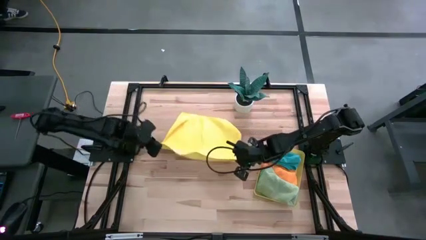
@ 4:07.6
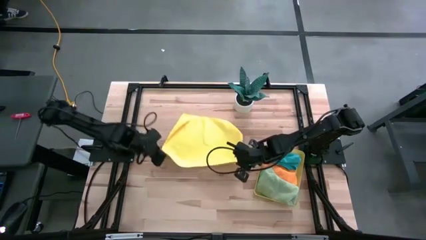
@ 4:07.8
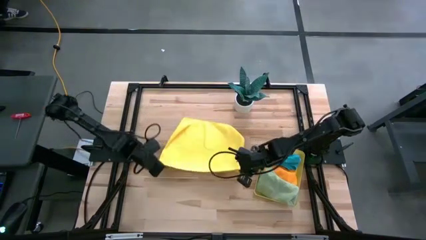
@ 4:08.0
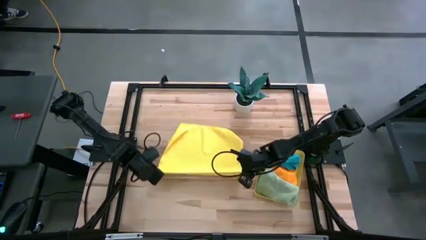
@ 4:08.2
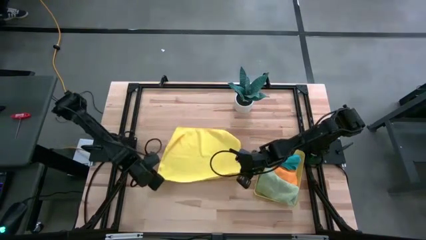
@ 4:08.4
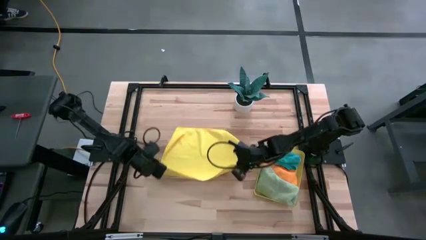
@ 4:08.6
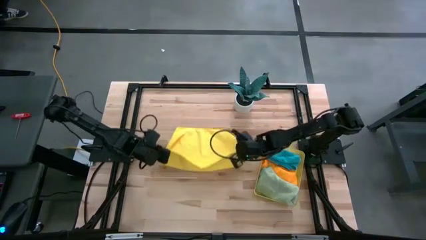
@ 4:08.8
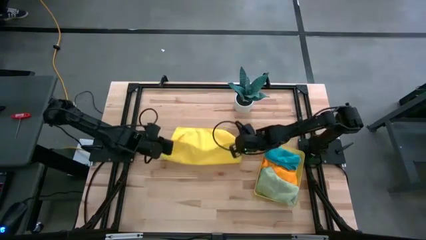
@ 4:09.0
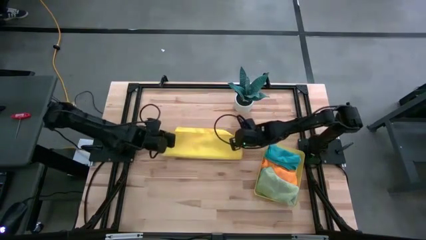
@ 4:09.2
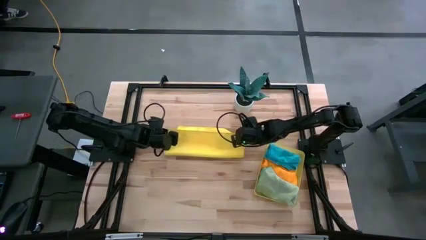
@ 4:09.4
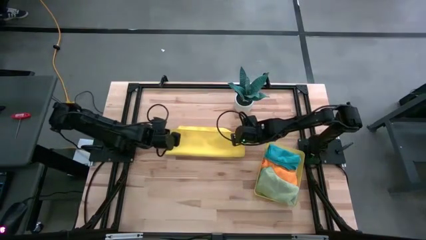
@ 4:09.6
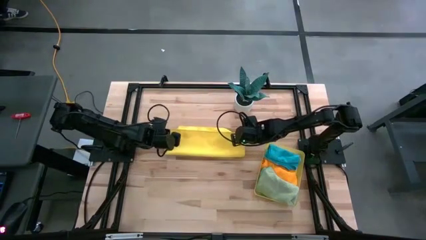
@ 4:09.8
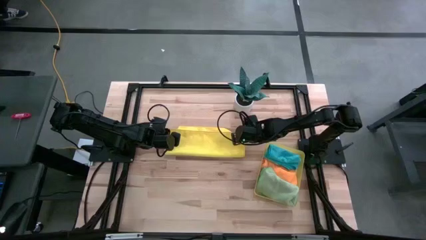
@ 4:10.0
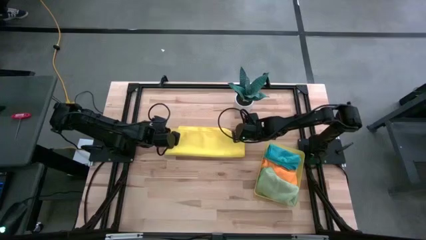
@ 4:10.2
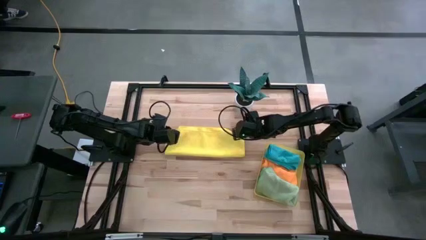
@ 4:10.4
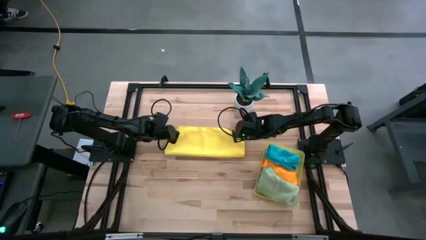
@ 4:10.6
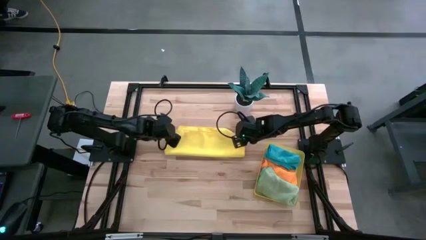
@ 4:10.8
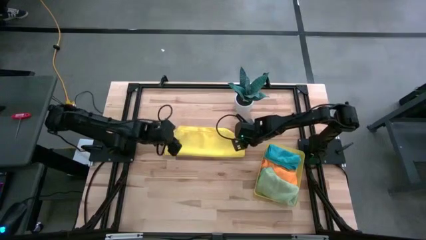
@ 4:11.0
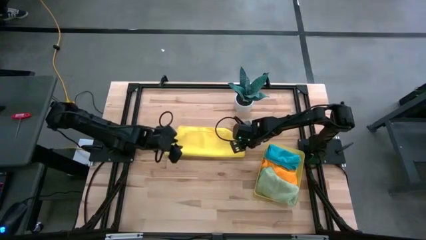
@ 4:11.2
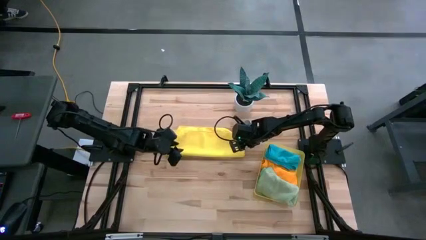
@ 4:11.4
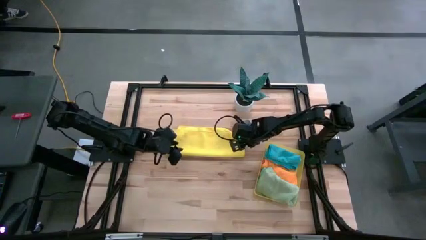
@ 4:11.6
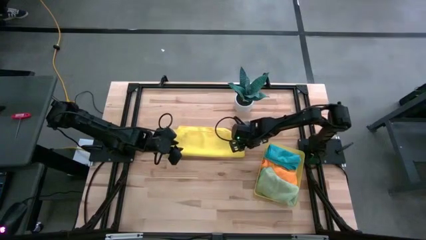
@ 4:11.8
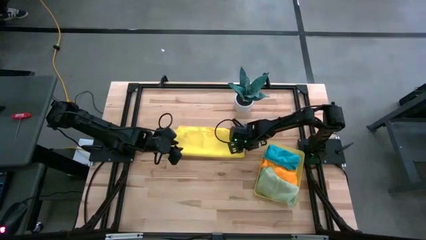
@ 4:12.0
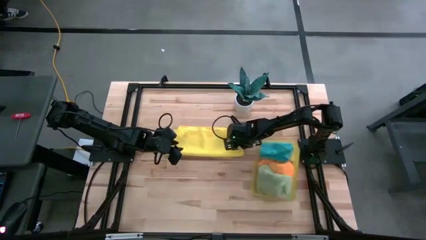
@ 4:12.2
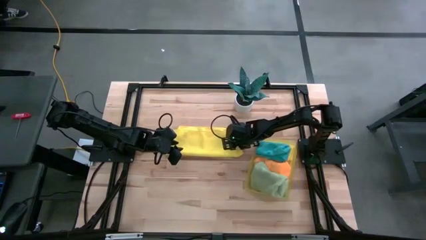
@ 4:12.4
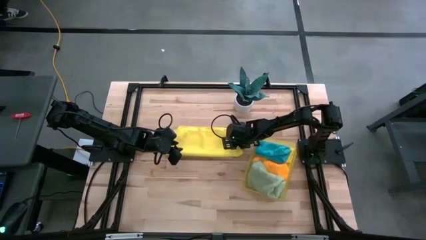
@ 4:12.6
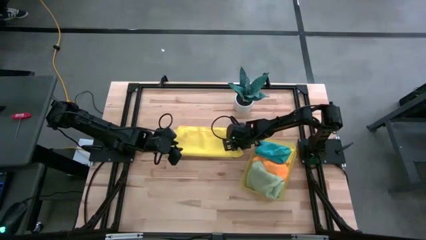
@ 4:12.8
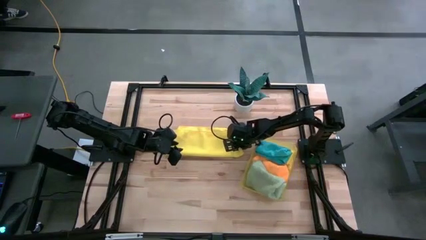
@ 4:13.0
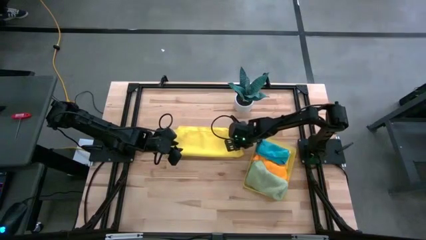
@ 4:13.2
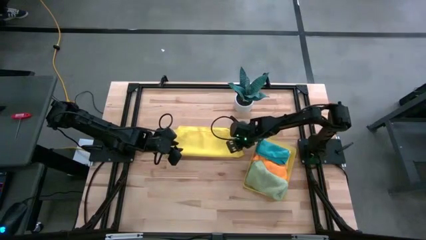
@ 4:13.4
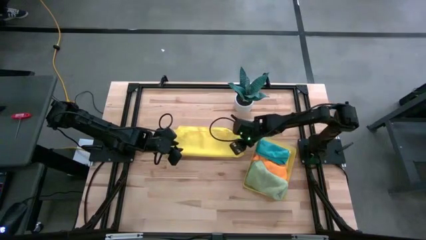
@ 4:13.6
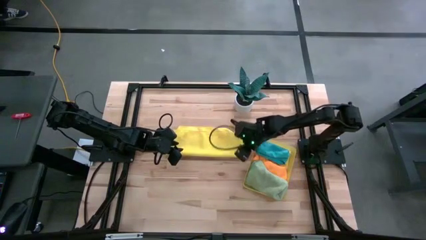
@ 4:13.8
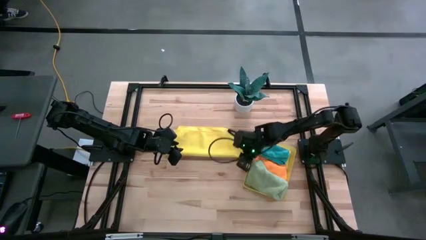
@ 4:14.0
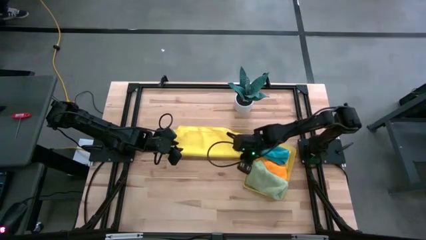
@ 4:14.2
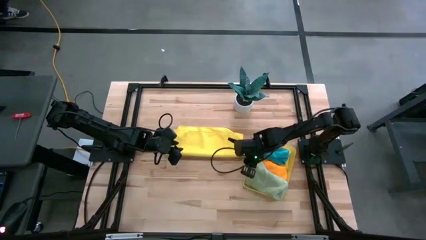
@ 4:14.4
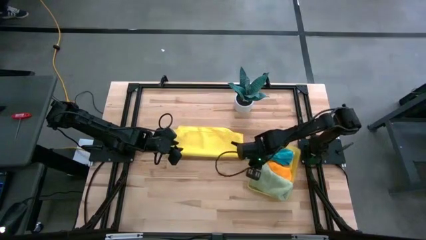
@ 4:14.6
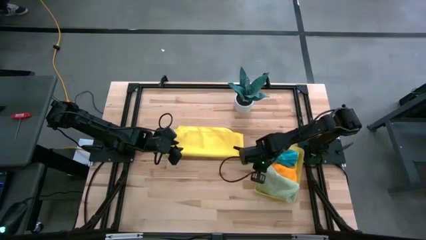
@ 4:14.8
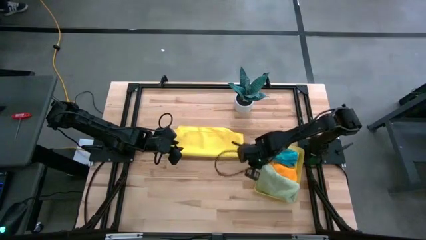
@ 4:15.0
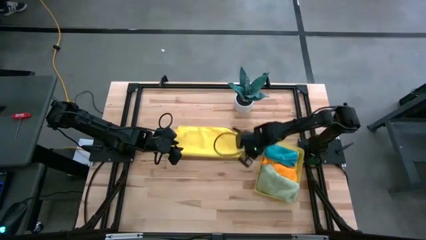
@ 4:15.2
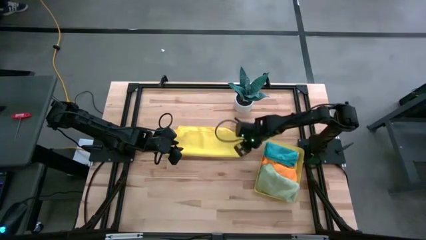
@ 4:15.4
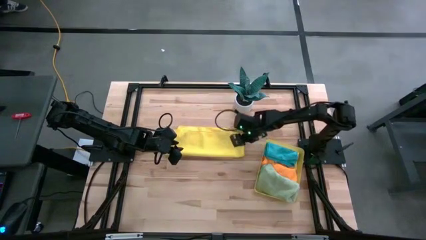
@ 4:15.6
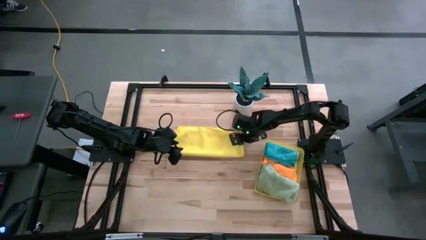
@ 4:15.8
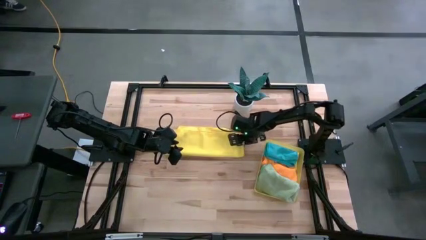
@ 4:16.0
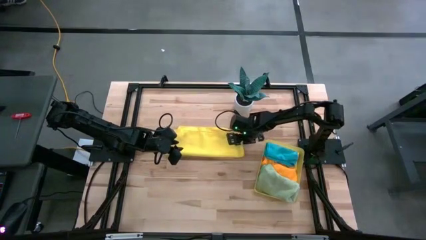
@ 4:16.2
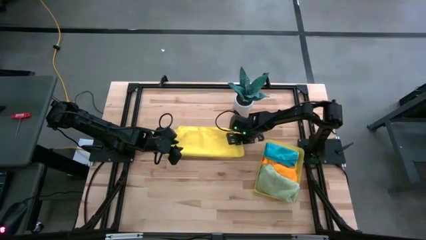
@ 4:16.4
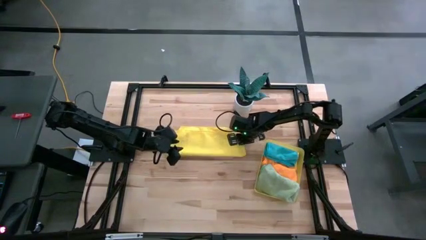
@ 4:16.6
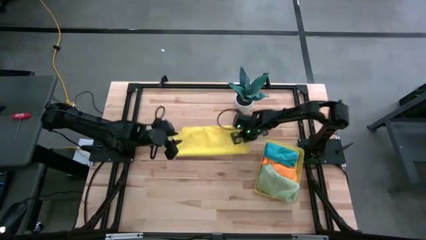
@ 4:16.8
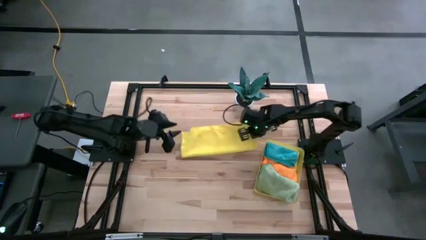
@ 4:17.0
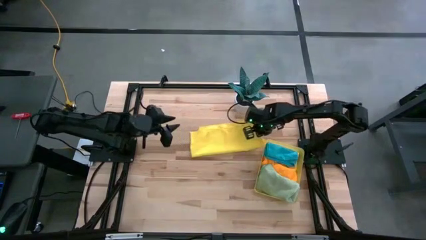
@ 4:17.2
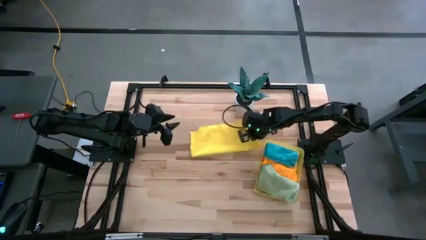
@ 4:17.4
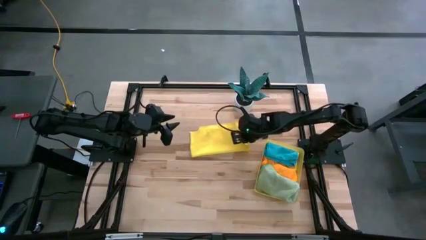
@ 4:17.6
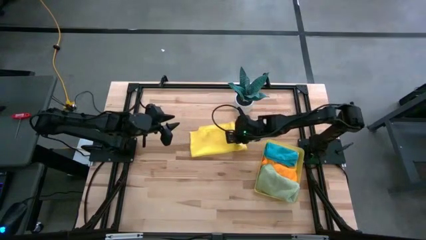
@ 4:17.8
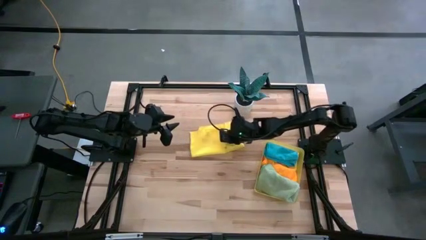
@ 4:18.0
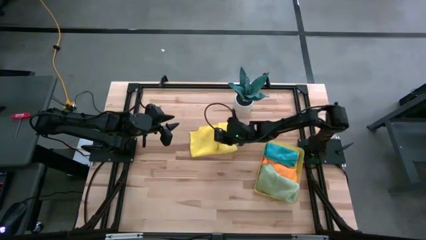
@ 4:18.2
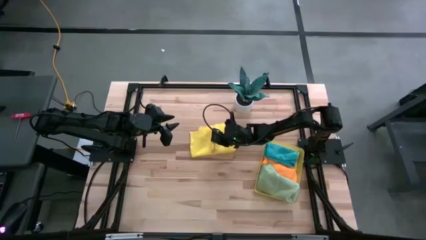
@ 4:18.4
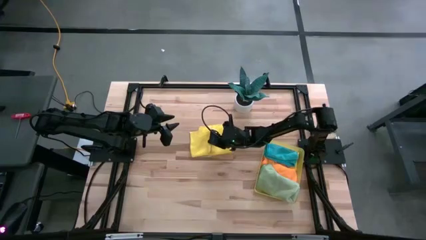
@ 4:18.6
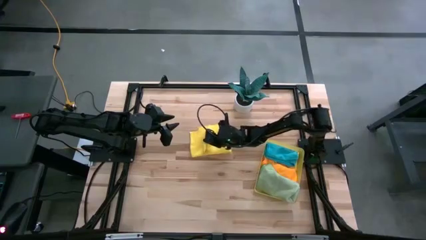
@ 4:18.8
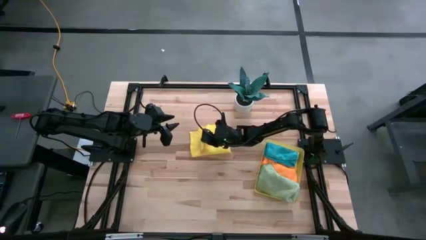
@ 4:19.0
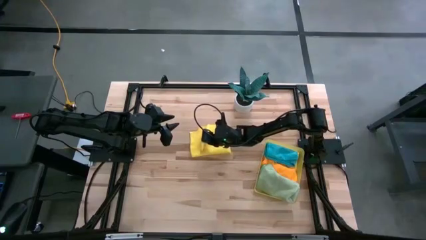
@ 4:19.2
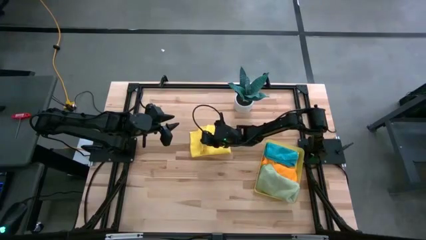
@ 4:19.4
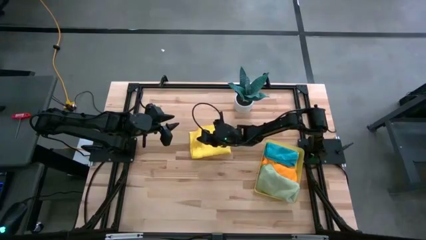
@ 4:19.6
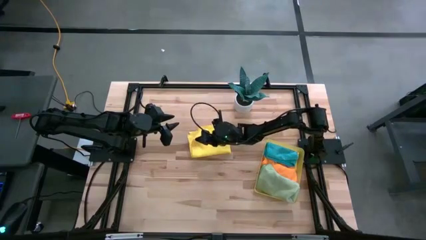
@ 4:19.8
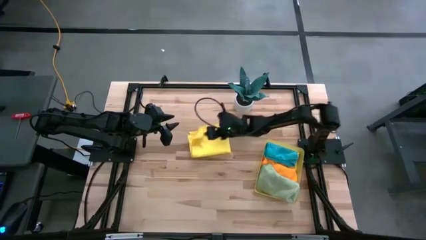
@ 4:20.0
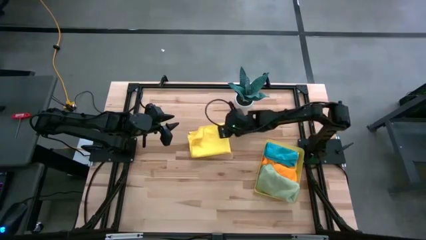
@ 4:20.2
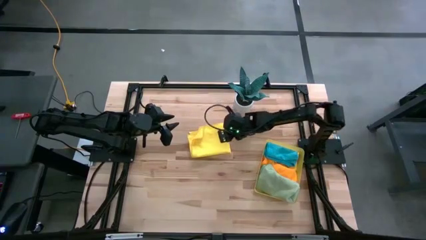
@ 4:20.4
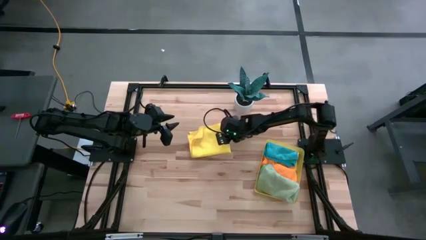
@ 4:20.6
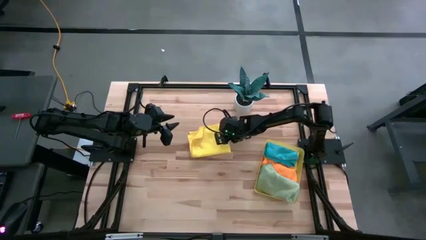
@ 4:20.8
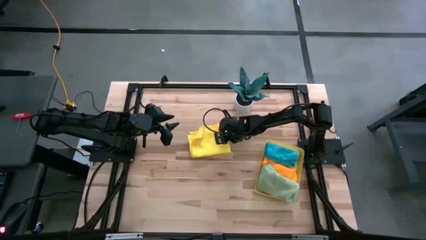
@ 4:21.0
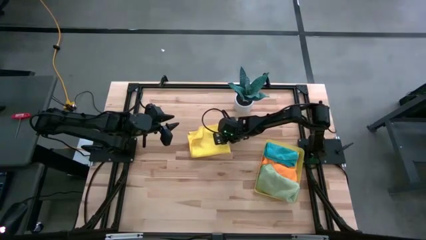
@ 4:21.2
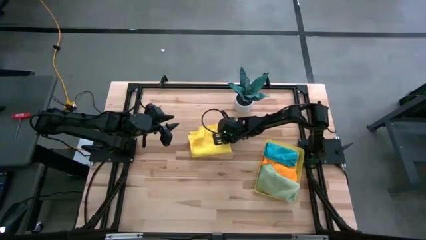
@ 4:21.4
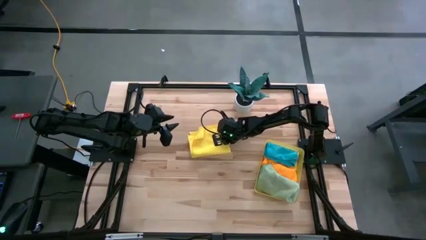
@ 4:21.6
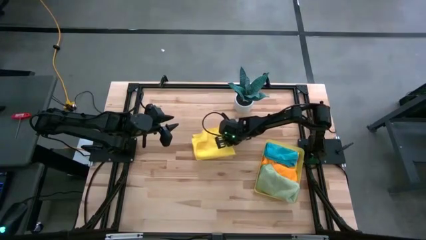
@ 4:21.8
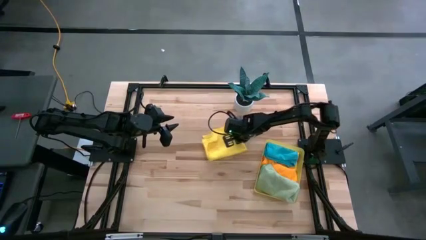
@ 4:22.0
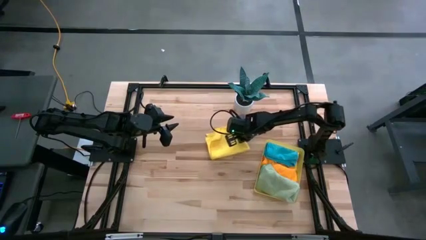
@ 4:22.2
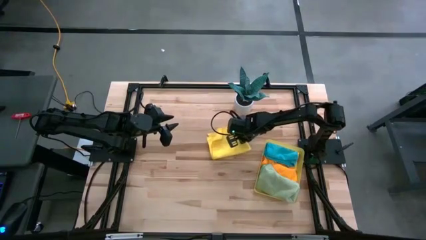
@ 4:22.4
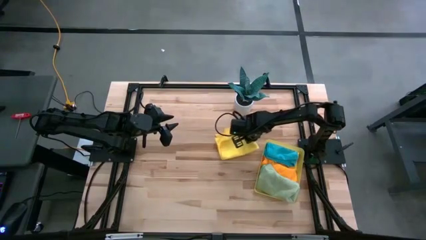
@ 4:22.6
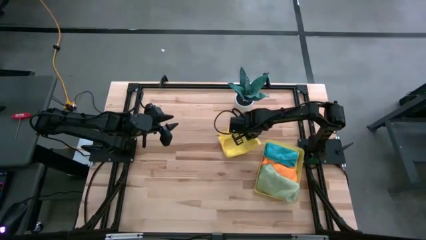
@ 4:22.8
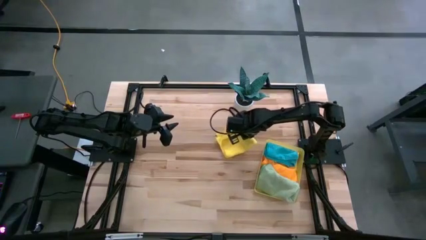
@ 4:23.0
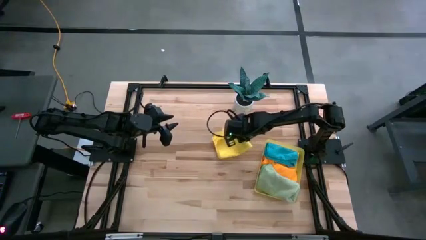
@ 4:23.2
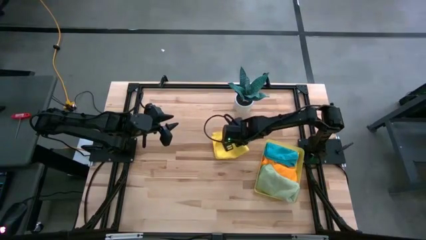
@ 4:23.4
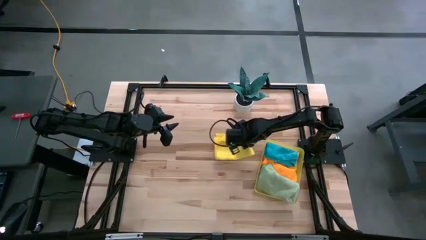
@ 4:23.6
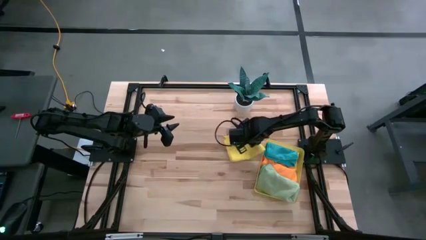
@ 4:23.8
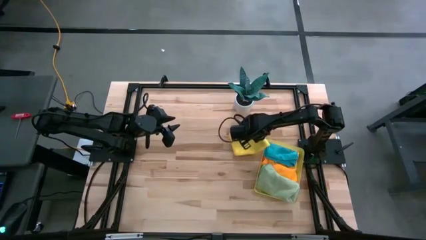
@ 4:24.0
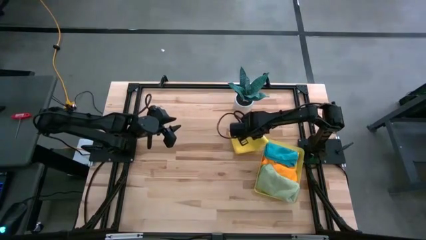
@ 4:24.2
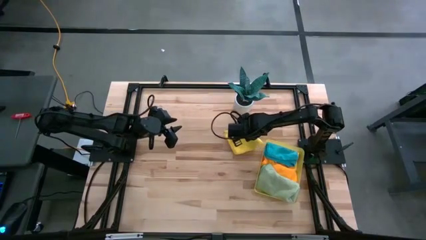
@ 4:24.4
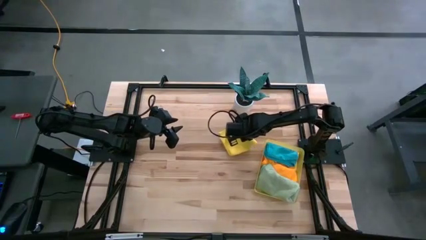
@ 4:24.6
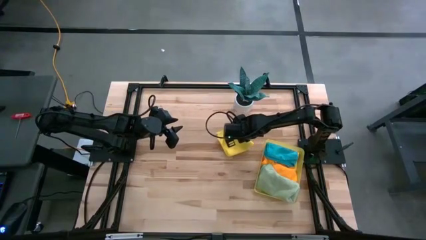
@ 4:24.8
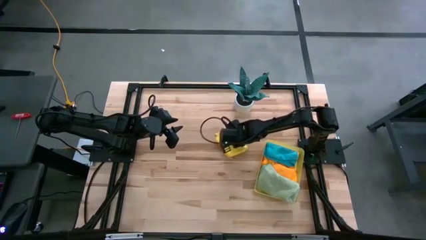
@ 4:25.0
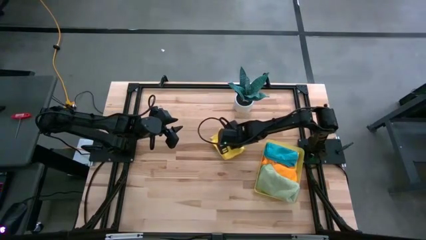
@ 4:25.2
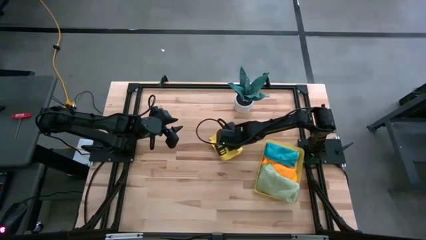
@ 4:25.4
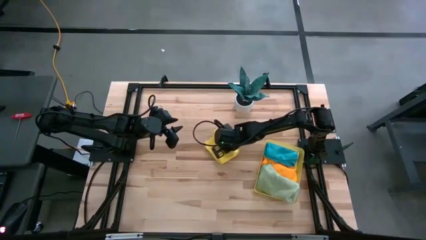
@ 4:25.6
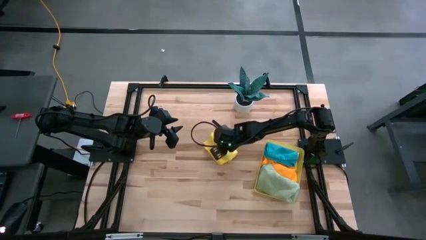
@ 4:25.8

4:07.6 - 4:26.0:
Task: Fold microfiber towels
Fold the yellow microfiber cloth
